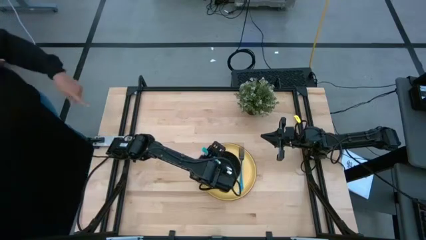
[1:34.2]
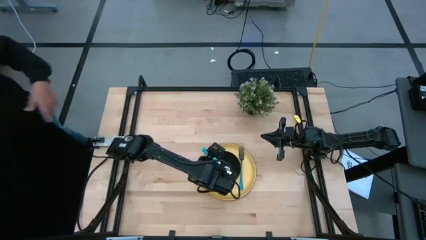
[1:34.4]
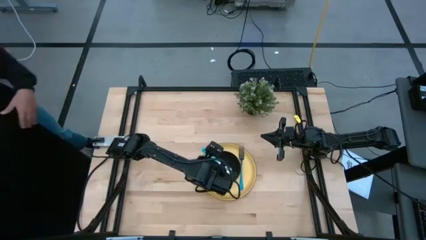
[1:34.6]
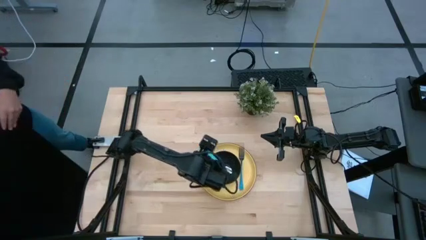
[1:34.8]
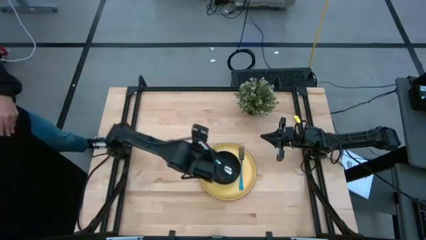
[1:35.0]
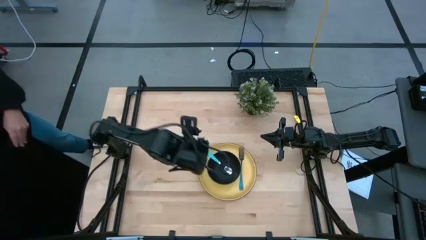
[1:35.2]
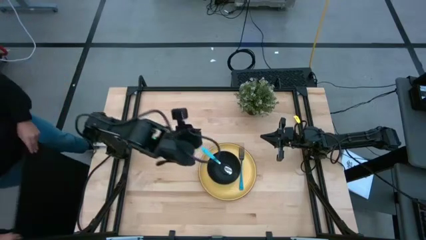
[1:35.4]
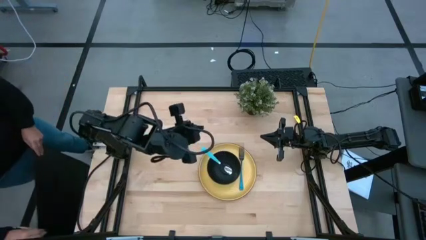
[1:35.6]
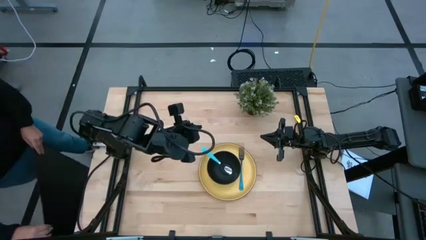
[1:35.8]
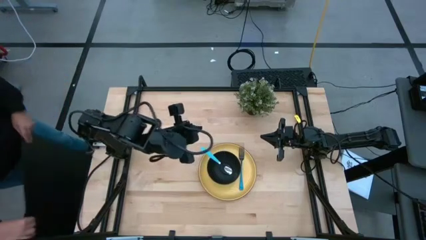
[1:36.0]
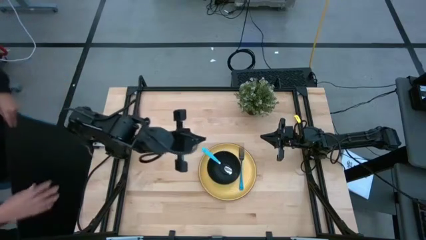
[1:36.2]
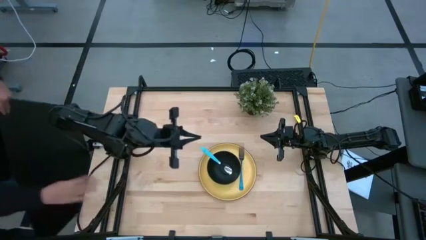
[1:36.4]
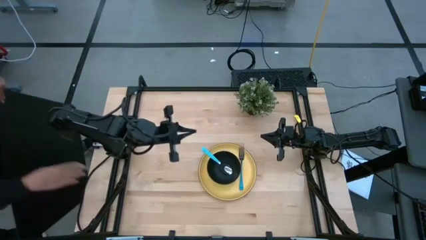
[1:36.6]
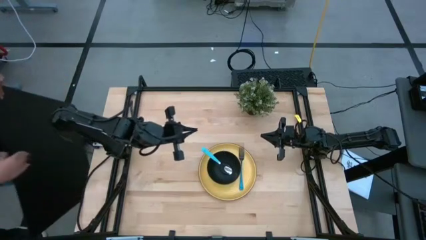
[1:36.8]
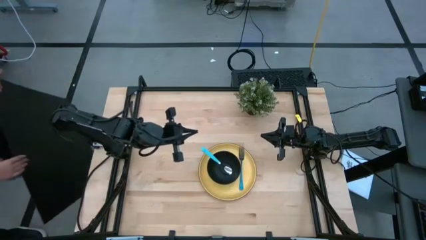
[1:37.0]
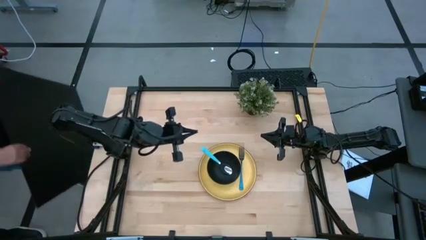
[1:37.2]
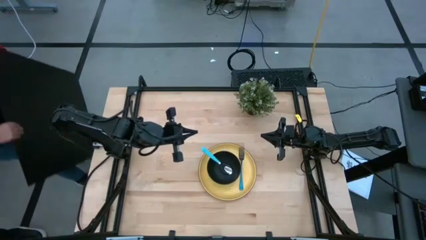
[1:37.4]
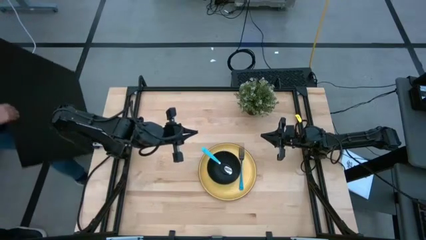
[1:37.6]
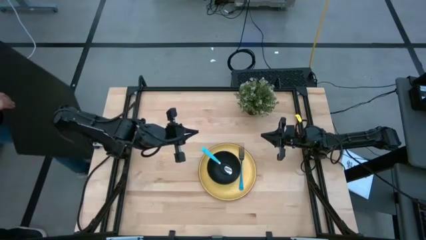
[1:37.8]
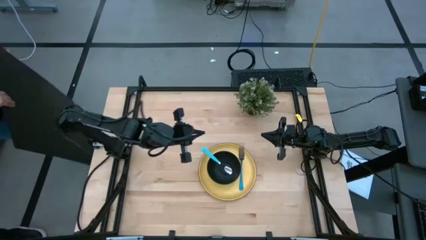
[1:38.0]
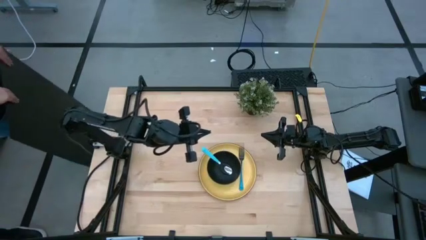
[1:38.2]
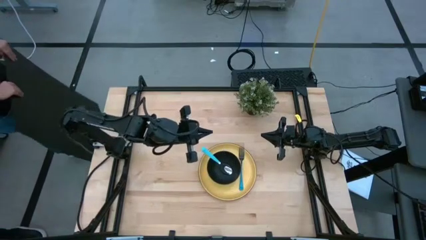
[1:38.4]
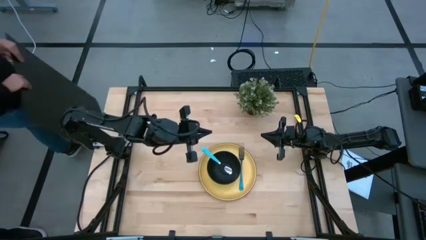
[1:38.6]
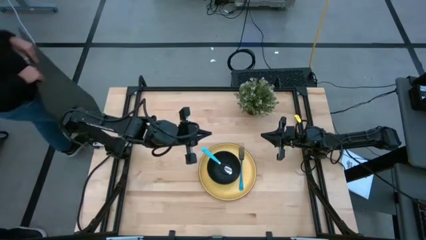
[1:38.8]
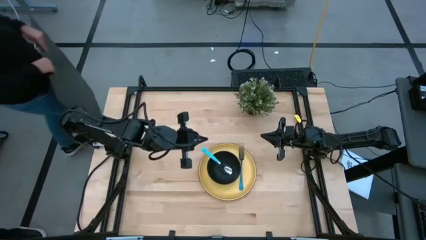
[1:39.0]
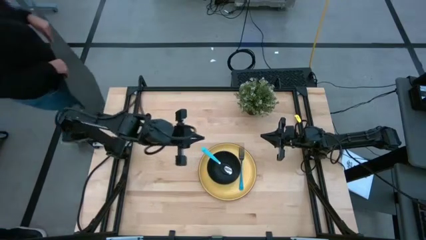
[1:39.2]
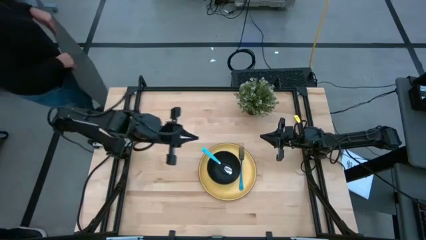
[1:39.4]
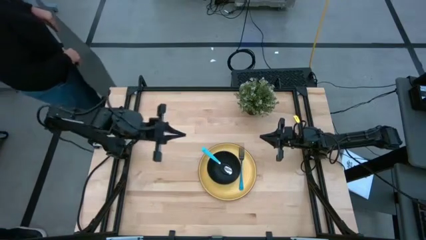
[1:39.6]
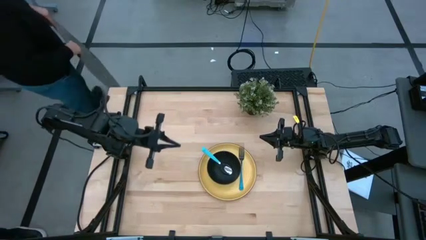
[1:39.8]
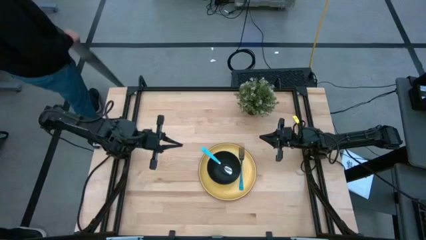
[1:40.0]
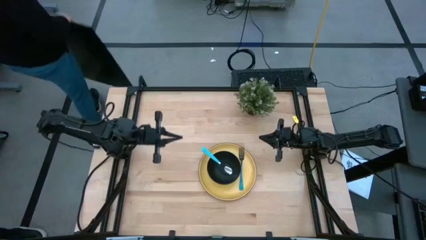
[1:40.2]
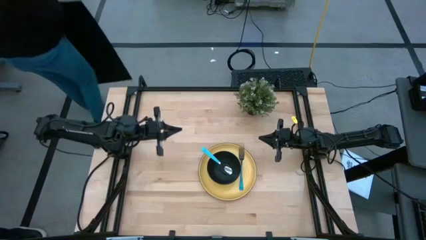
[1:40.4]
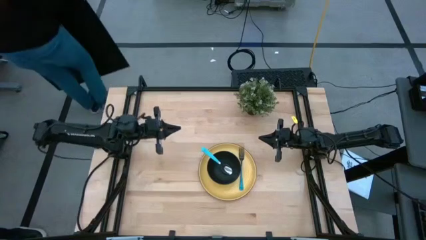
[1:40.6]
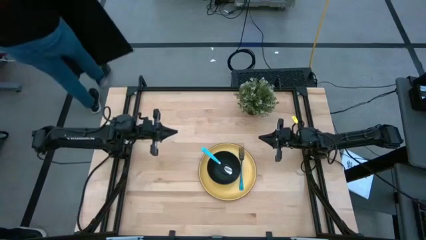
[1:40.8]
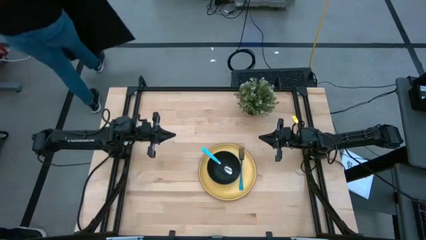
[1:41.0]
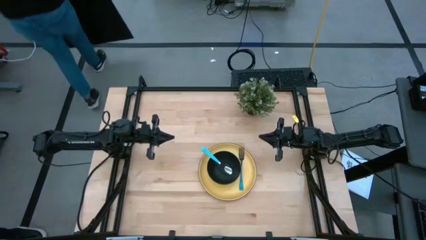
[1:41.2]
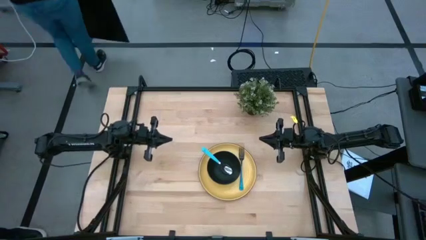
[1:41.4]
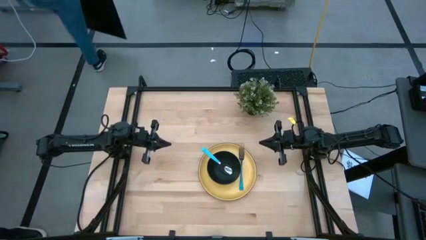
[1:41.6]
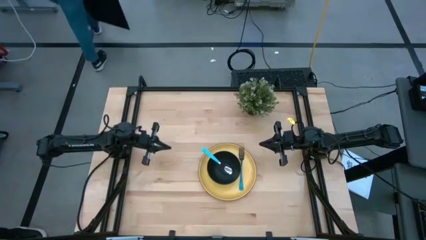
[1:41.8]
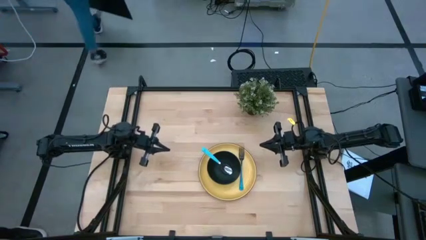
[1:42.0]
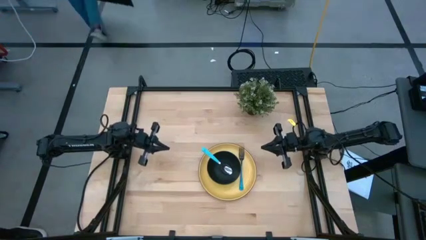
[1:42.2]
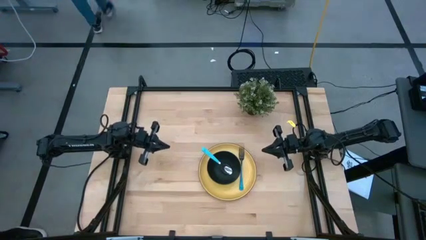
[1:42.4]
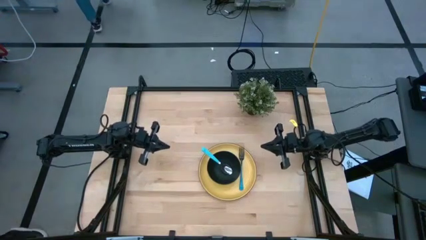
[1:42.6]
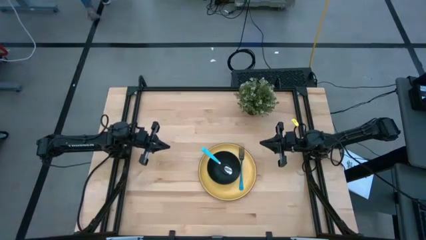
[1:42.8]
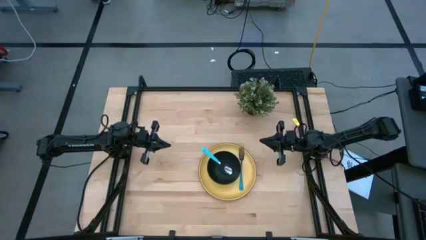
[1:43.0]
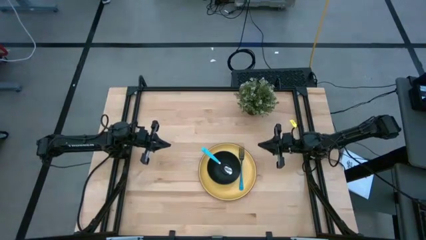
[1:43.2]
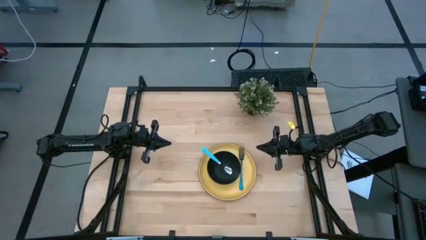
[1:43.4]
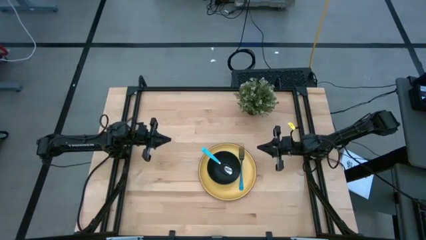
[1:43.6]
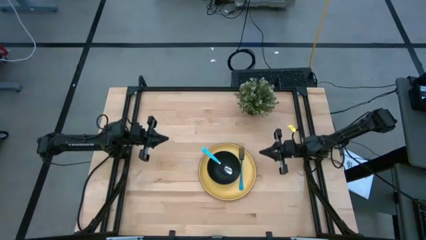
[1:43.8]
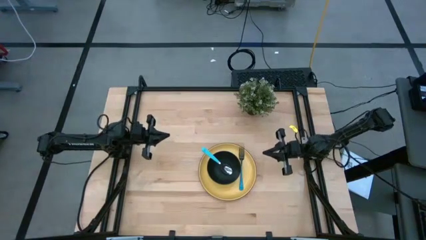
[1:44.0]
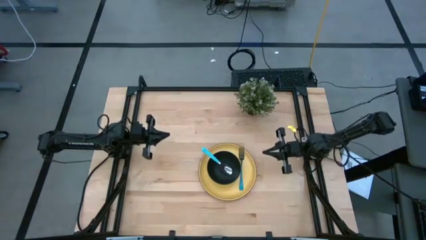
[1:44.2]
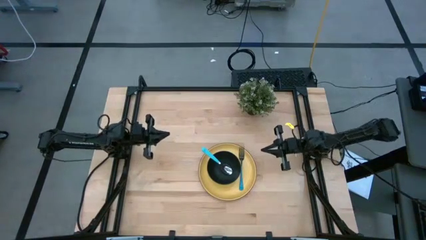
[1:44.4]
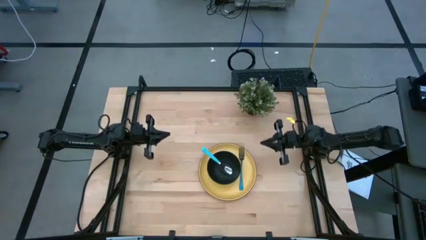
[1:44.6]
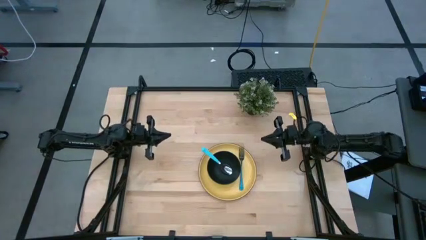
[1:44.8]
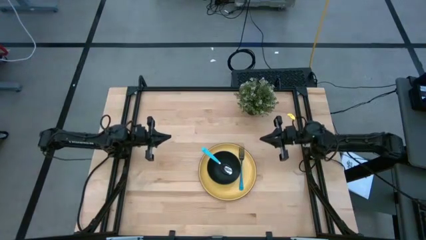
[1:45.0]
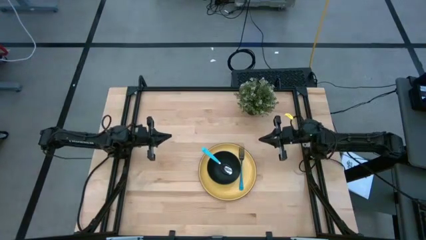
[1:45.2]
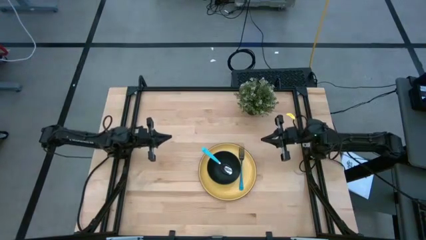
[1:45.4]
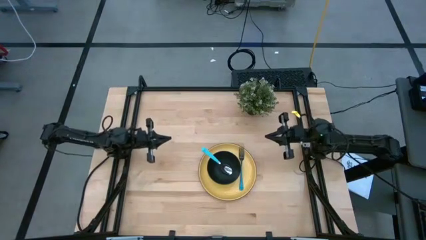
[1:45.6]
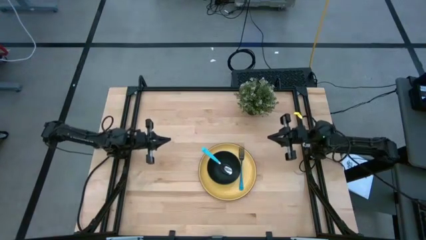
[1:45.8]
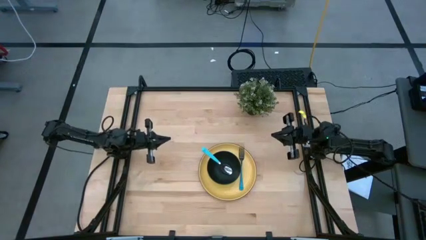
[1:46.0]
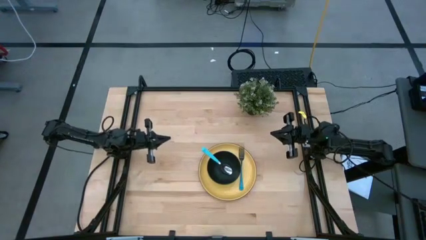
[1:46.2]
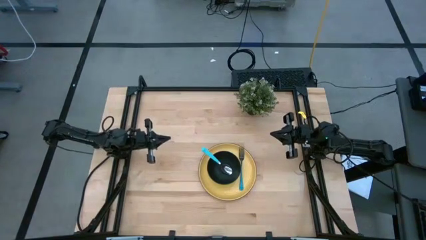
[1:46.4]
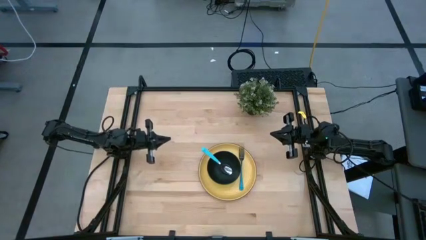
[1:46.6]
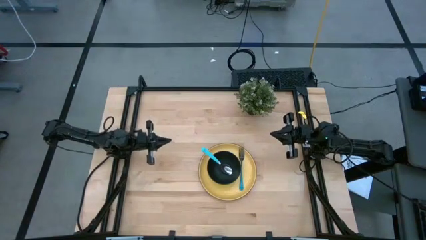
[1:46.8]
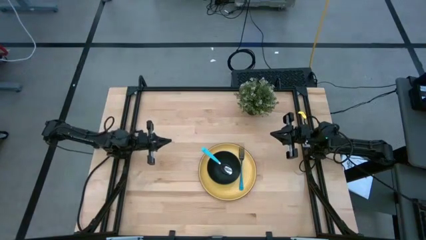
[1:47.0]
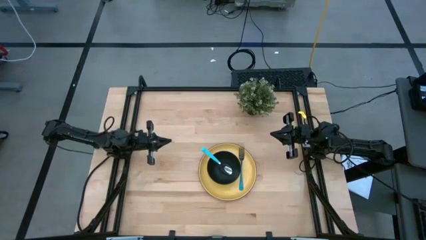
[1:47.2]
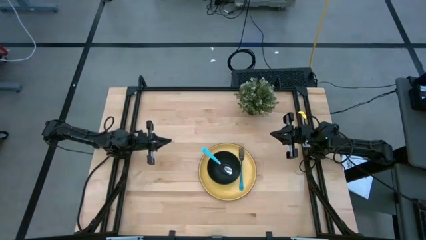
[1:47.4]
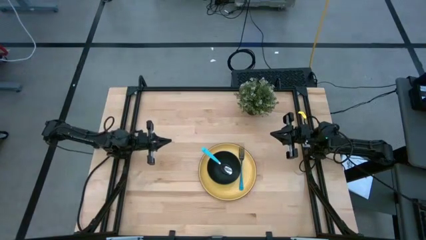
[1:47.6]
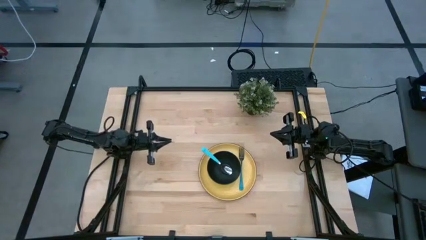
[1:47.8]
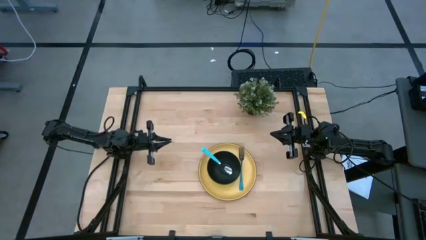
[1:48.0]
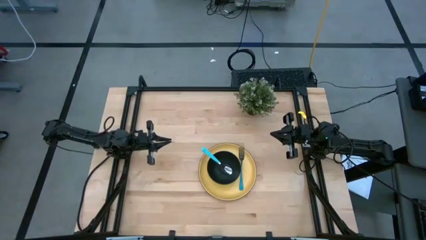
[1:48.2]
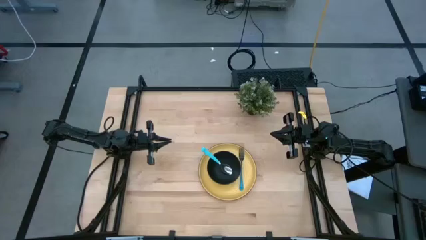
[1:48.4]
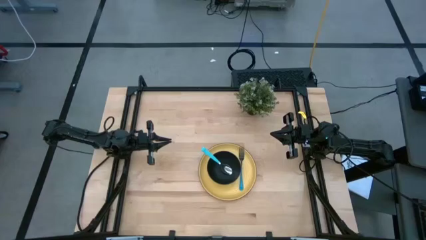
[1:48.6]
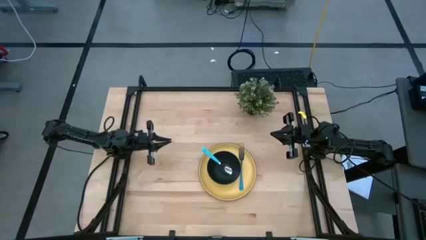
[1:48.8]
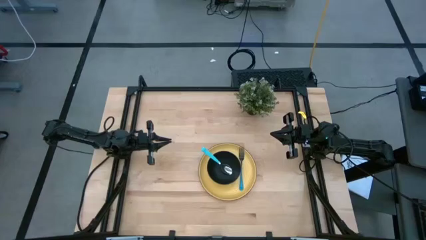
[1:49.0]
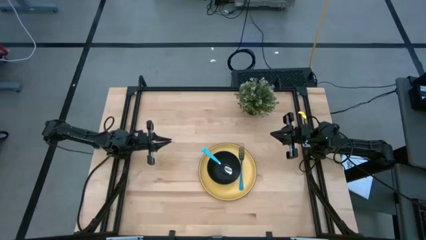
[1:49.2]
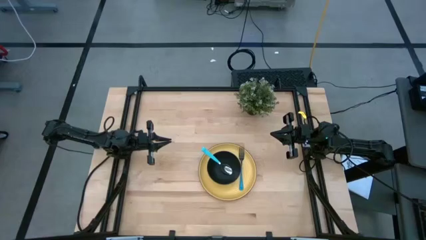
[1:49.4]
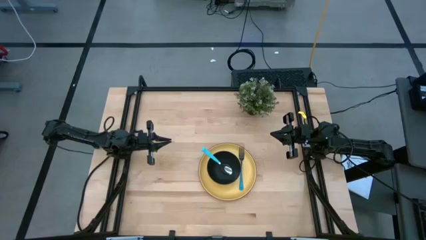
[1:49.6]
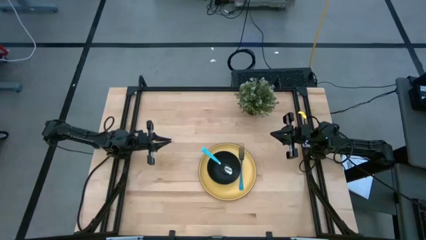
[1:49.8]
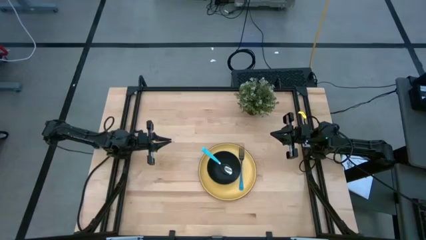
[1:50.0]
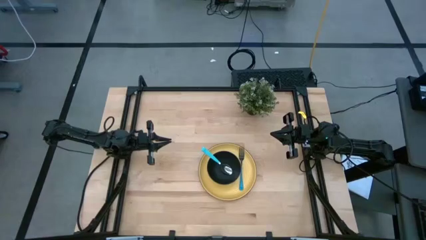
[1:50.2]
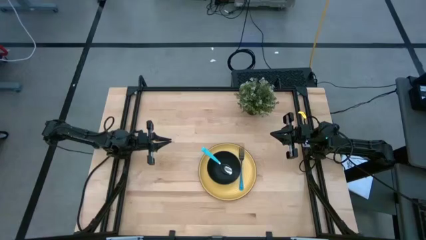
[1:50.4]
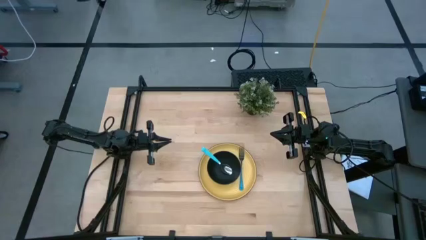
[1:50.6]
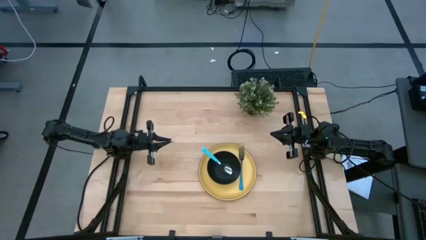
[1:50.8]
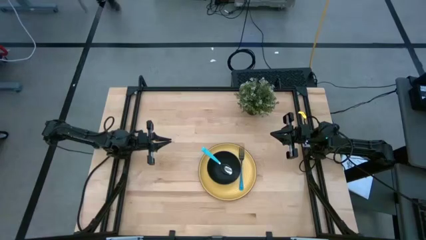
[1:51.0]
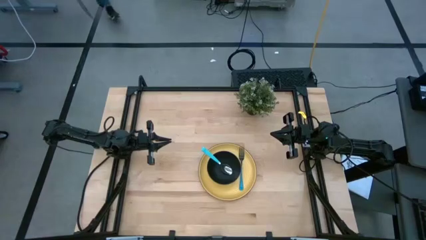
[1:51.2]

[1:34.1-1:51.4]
Task: Set table place
Return to Home Position
